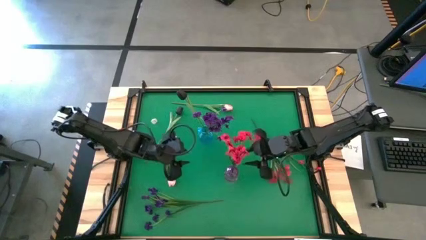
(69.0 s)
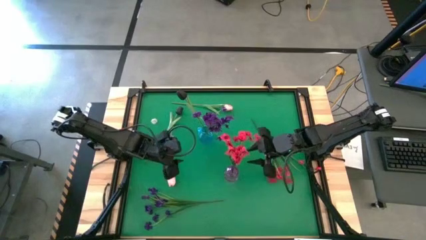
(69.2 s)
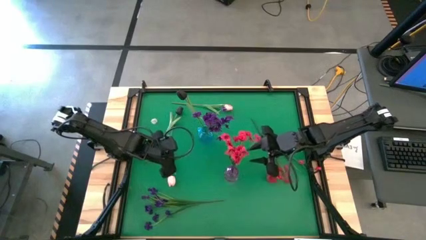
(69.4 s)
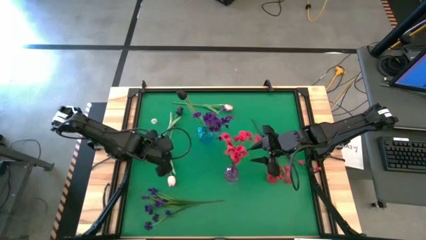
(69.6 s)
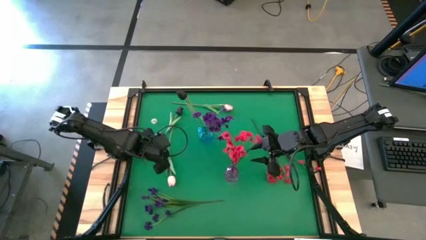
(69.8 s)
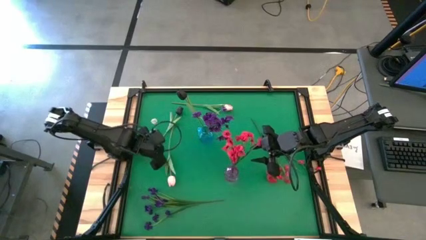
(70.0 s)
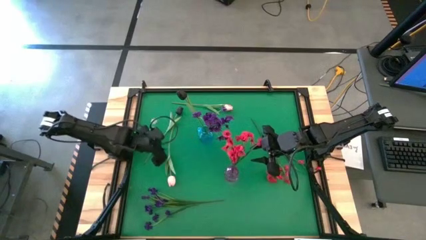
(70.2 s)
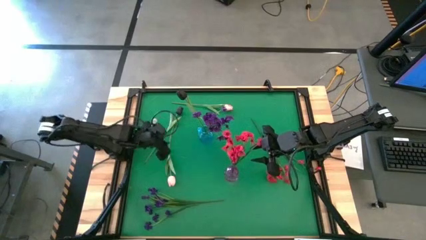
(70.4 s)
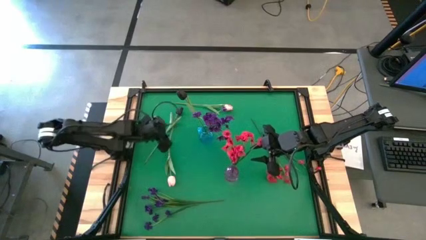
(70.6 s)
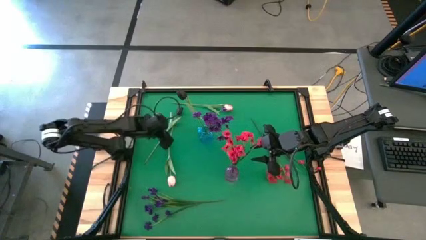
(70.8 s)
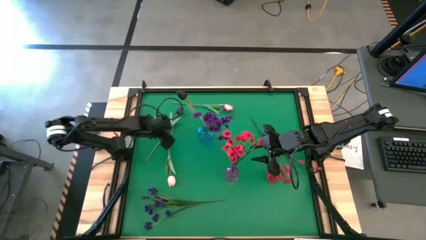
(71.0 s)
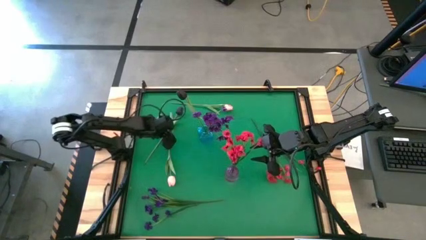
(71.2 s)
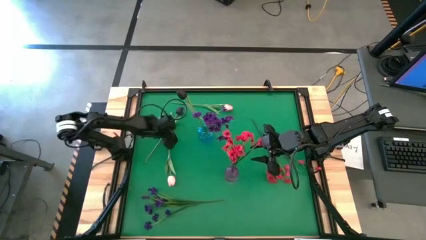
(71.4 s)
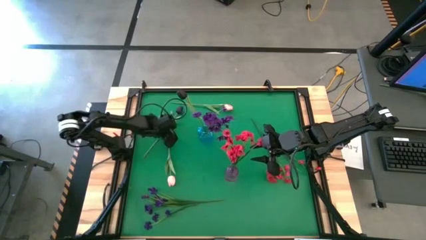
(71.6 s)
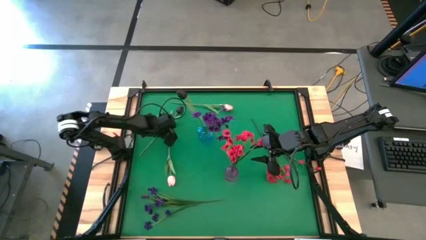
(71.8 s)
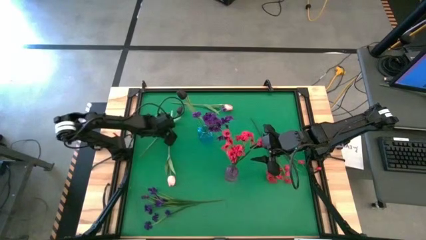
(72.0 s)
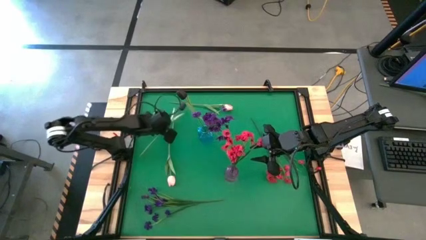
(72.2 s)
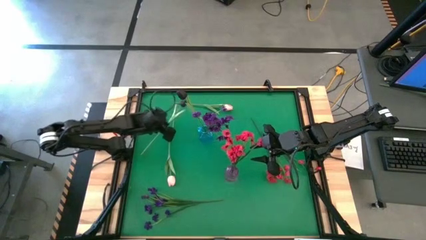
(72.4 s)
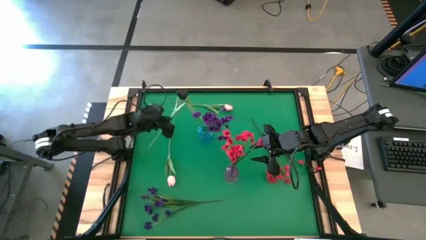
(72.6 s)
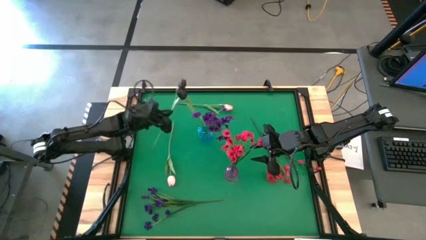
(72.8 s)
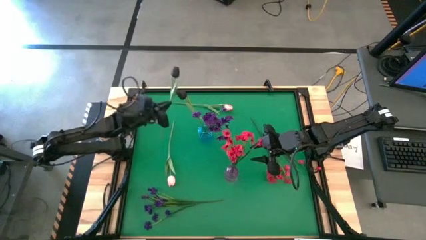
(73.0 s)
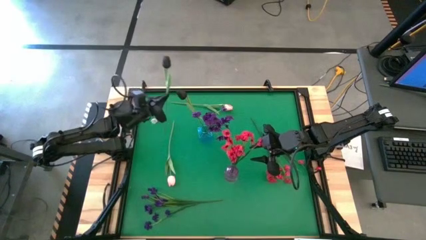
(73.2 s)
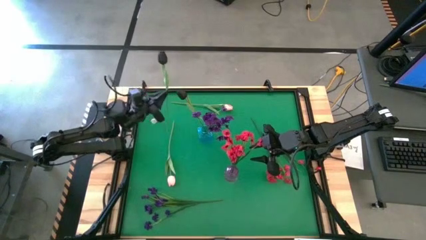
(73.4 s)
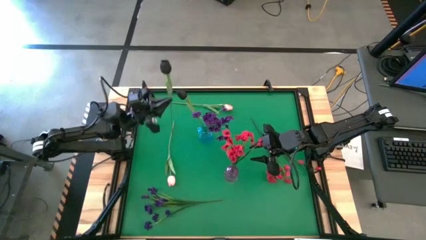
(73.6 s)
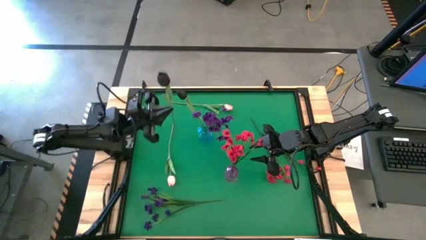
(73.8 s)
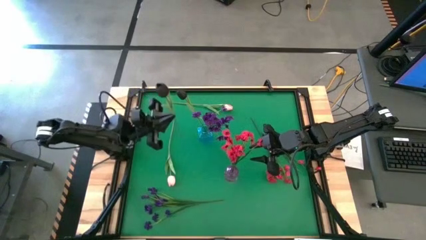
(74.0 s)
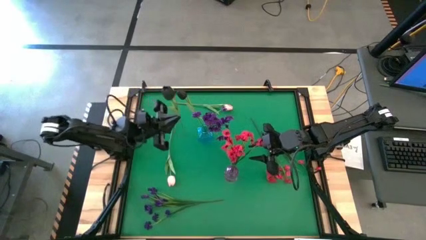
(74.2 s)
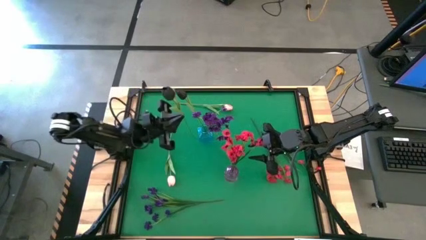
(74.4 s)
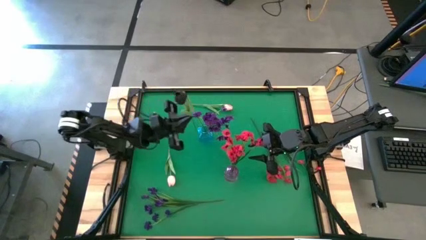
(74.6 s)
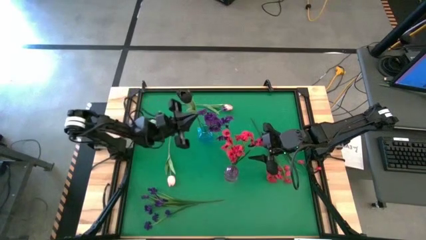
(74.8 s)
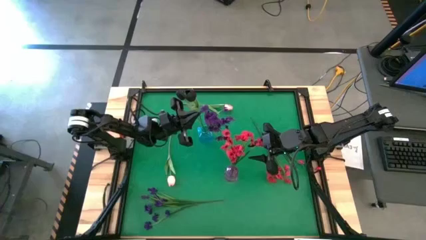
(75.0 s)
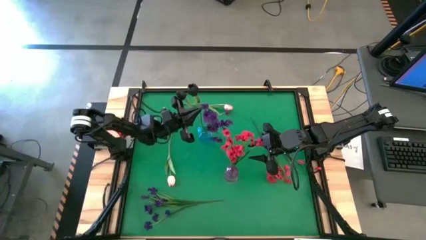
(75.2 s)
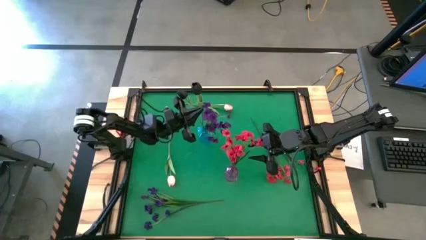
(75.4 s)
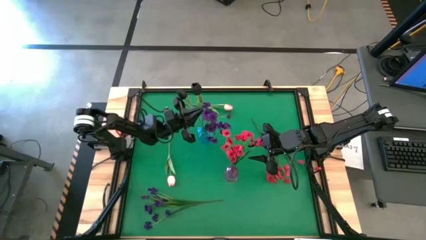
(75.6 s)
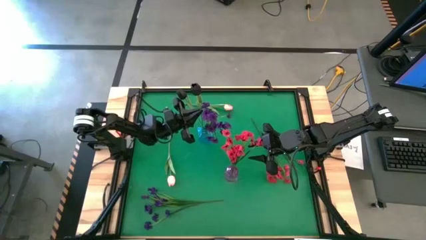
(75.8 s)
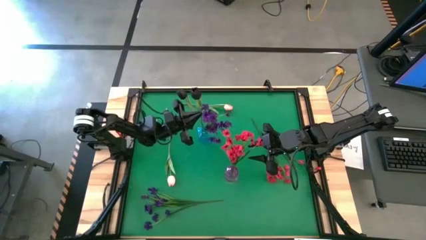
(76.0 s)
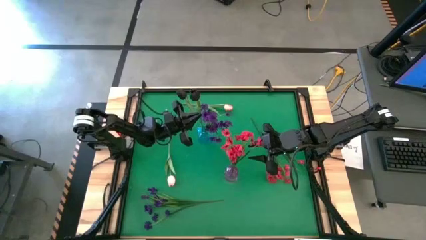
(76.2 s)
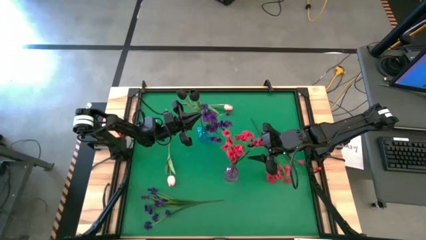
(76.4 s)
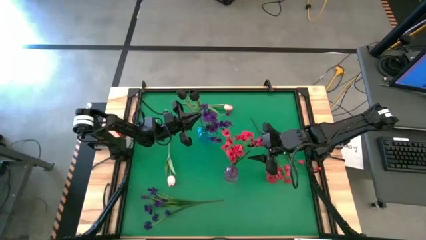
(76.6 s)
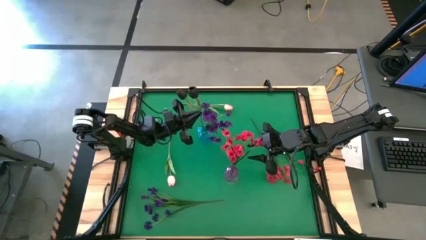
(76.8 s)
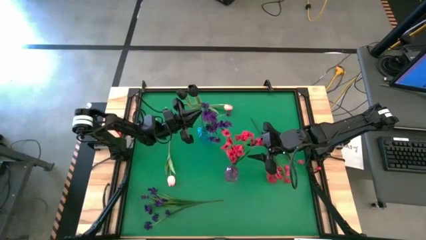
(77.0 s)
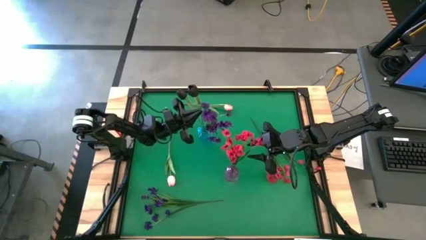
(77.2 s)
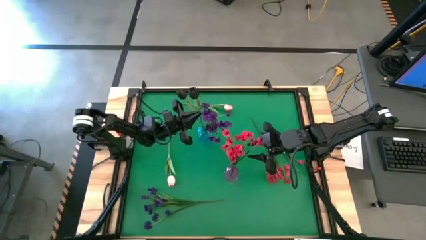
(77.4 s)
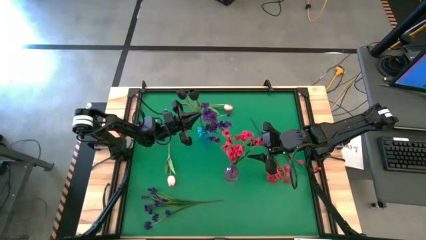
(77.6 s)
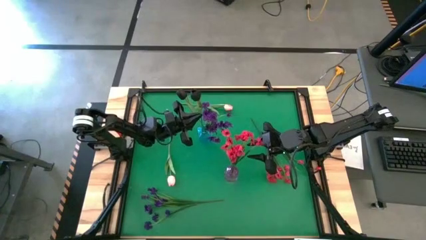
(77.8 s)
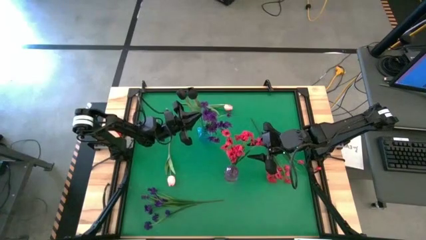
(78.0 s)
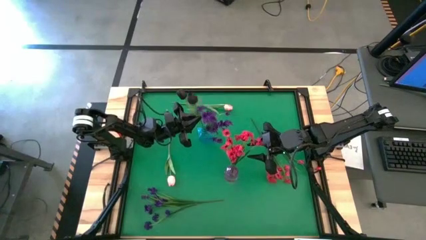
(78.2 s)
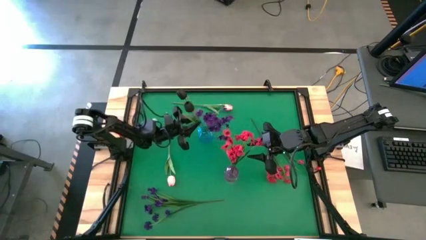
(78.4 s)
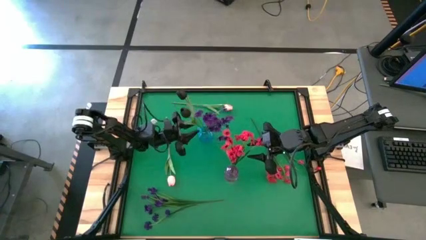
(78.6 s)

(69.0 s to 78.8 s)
Task: Sort flowers into vase by color
Put the black tulip into the blue vase
